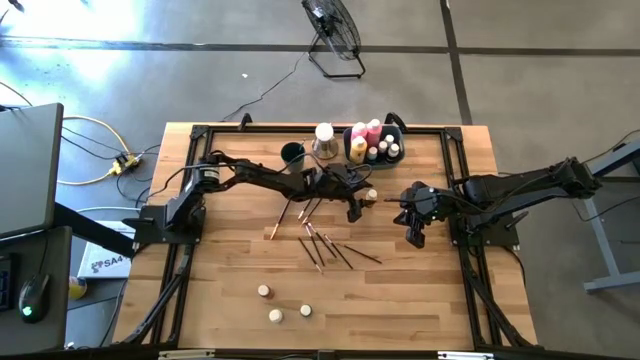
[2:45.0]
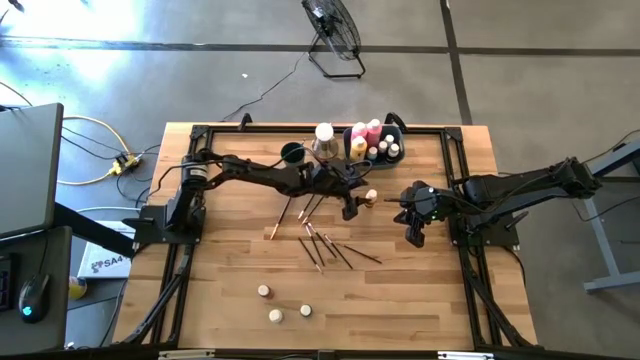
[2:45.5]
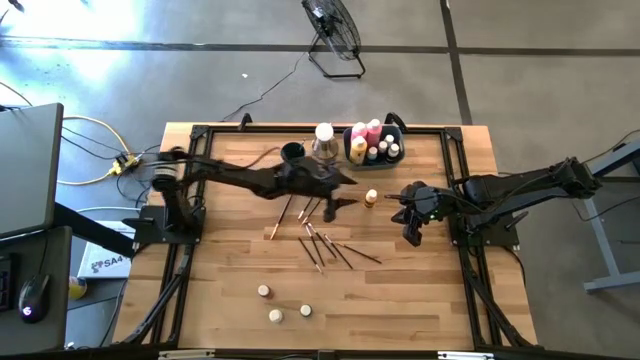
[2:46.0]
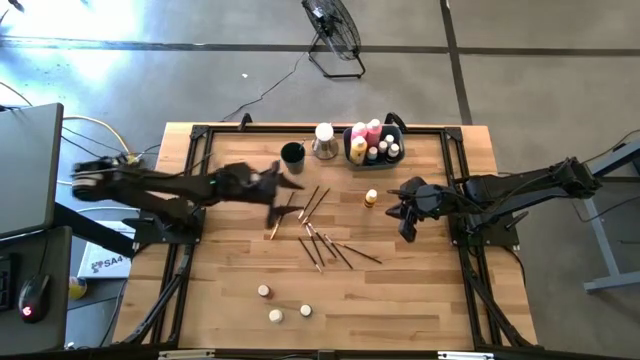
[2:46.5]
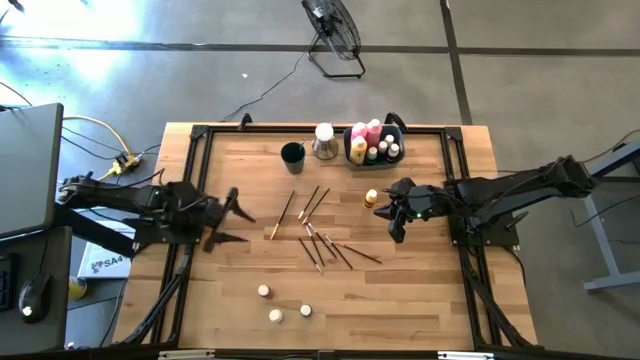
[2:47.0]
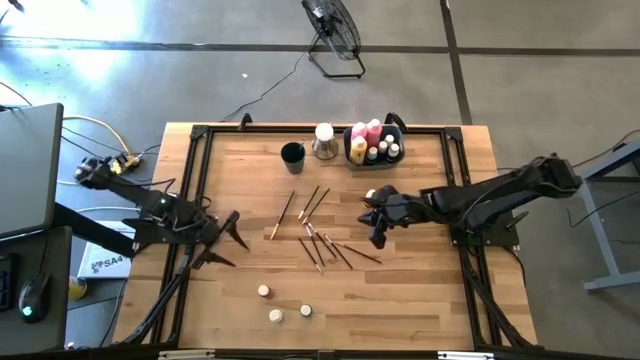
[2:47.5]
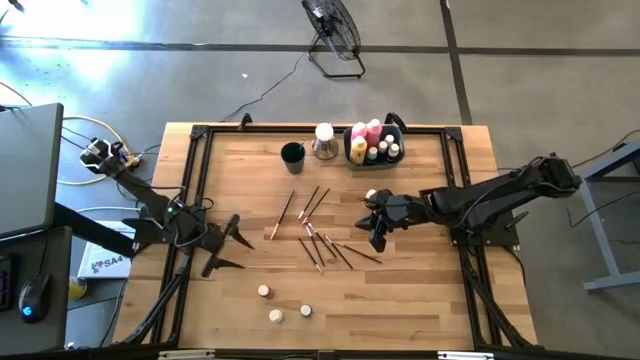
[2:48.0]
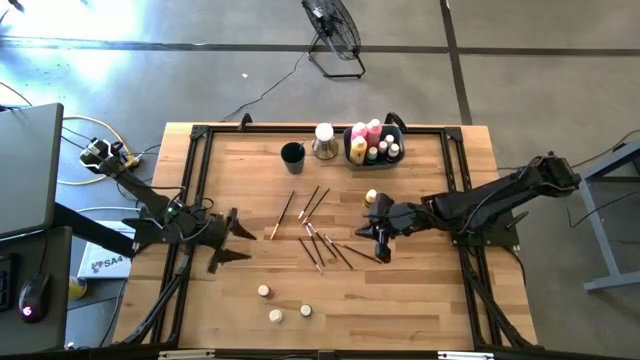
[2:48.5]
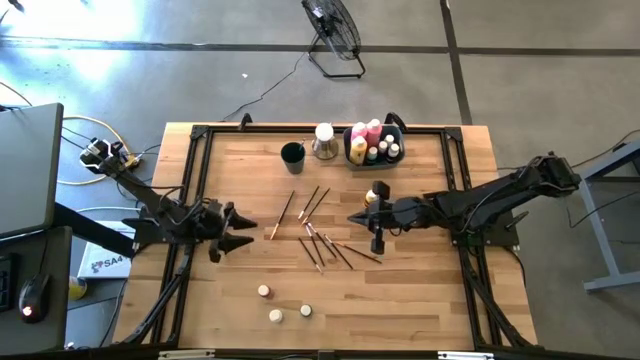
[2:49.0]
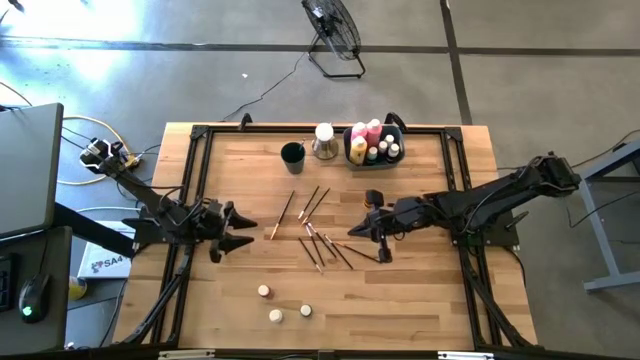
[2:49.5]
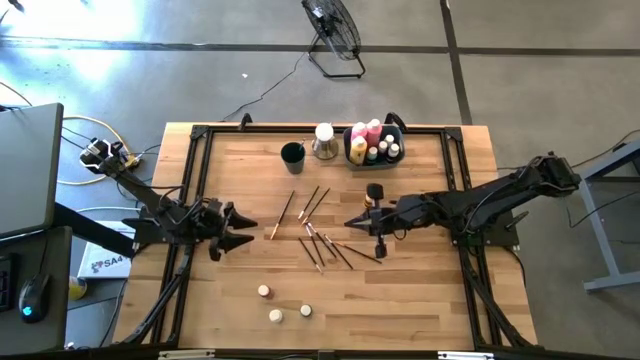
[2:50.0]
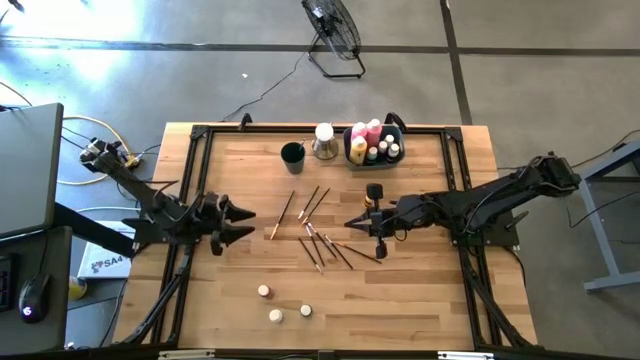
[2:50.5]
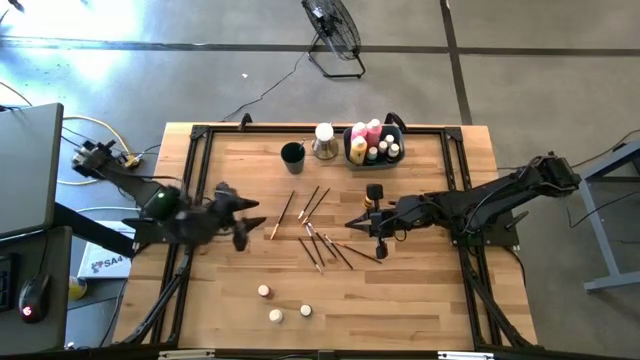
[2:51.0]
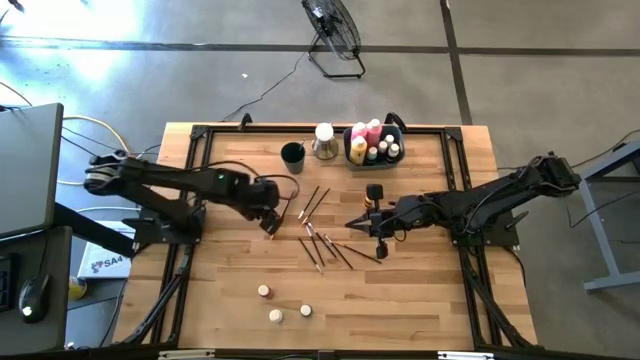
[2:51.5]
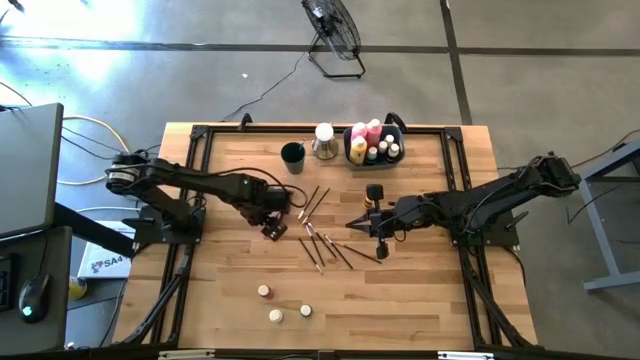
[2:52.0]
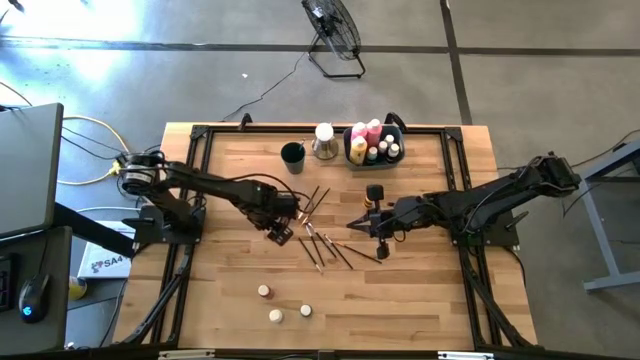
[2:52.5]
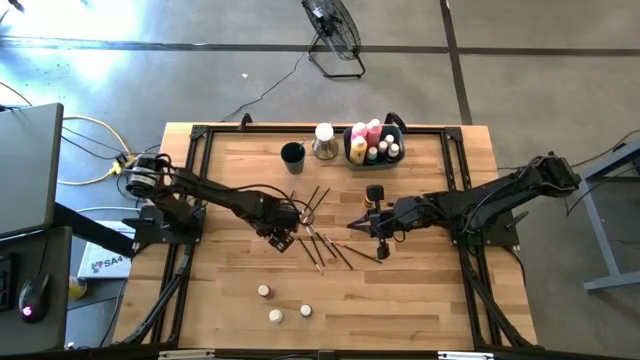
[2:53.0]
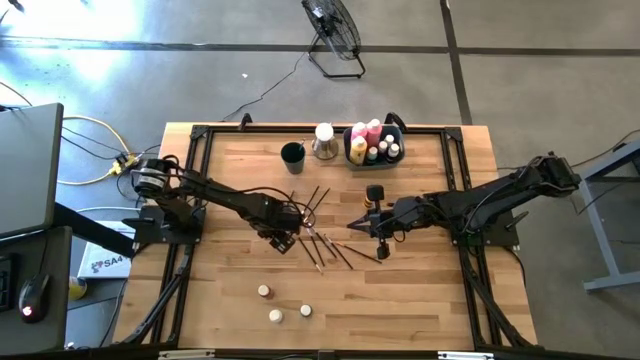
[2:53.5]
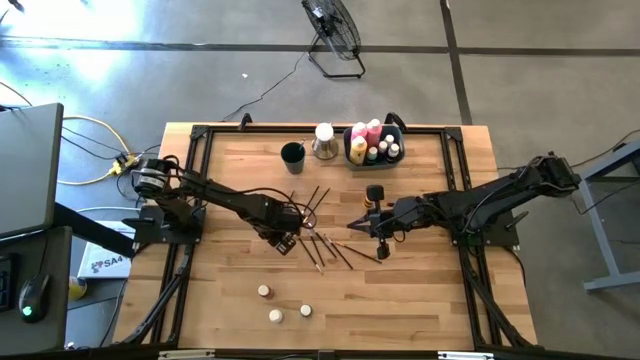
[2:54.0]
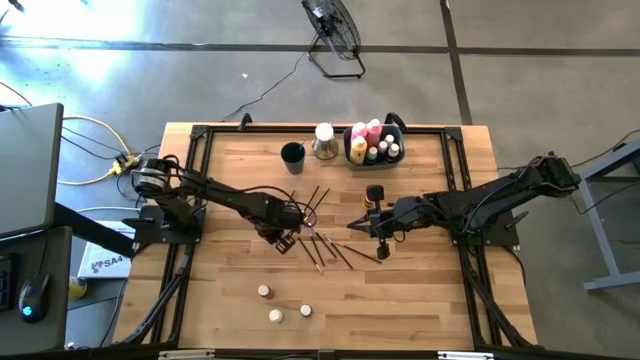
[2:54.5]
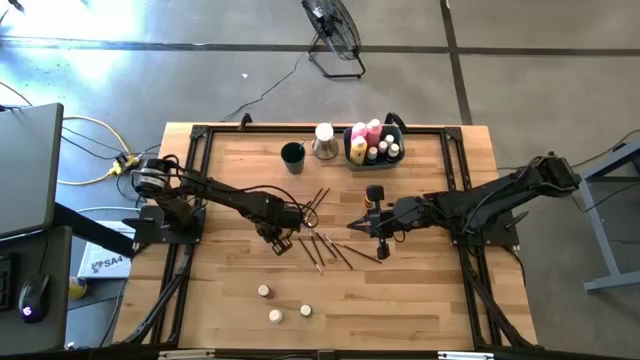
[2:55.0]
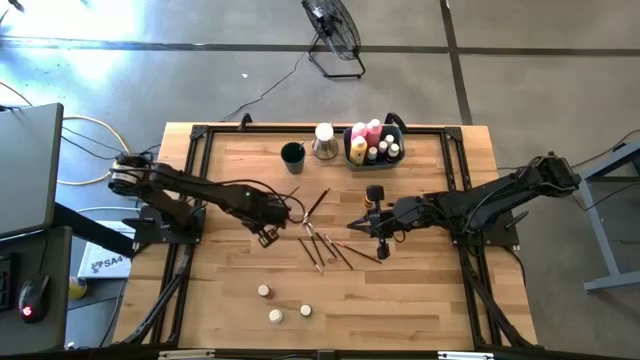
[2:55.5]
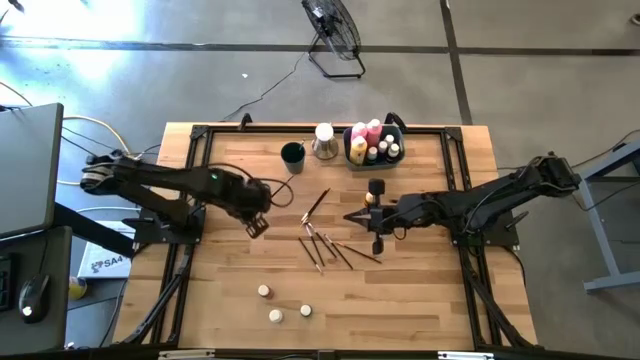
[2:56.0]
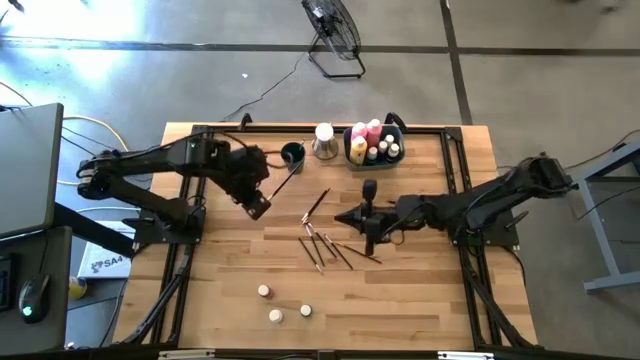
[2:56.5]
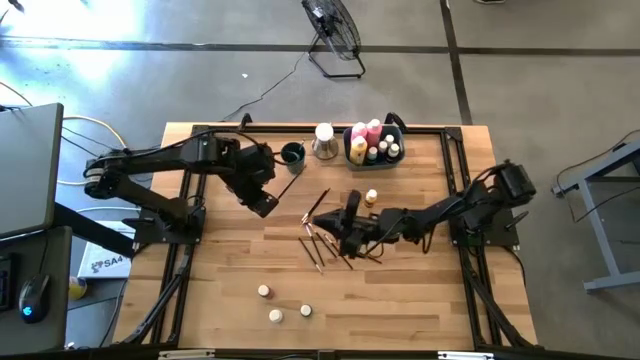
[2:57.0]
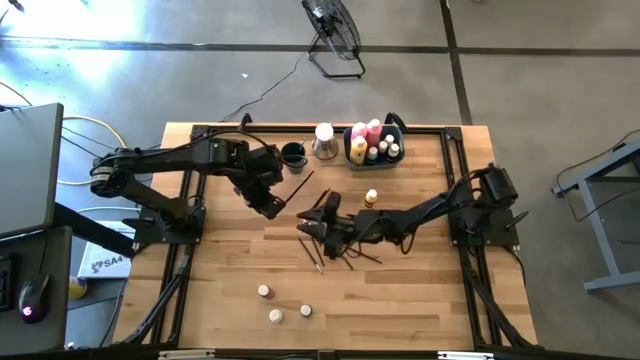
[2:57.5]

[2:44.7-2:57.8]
Task: Pick & Place Paint Supplies
Put the gold paintbrush into the blue cup
